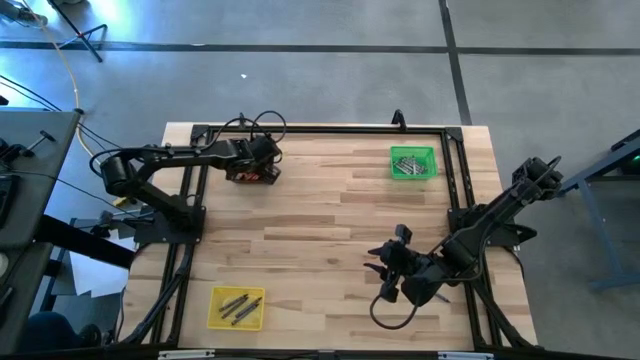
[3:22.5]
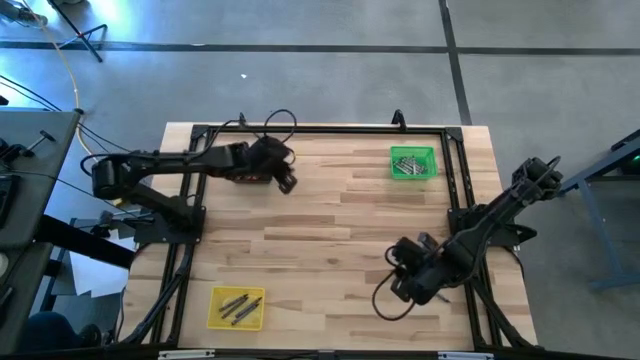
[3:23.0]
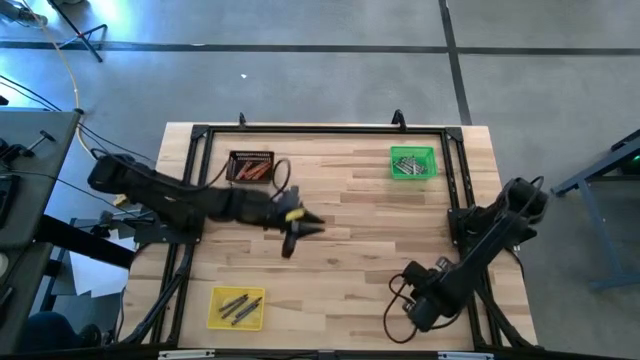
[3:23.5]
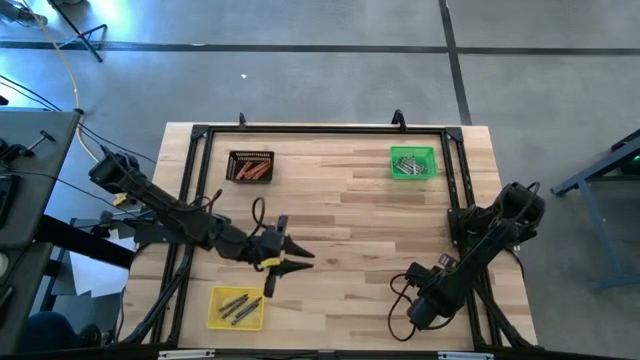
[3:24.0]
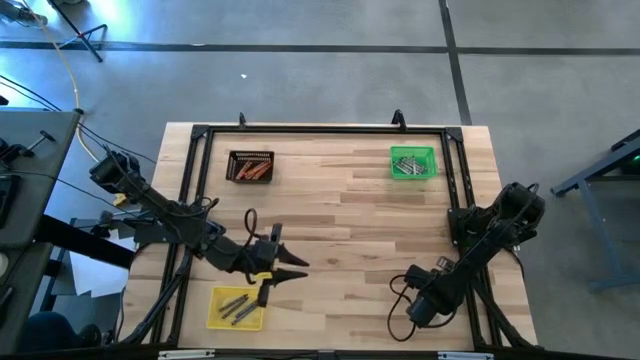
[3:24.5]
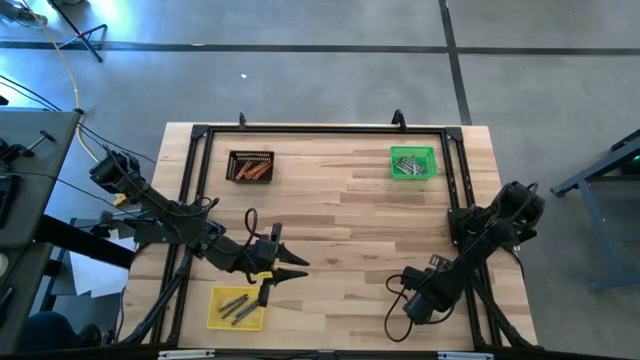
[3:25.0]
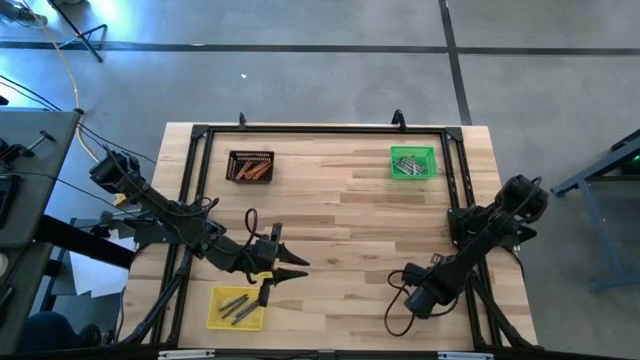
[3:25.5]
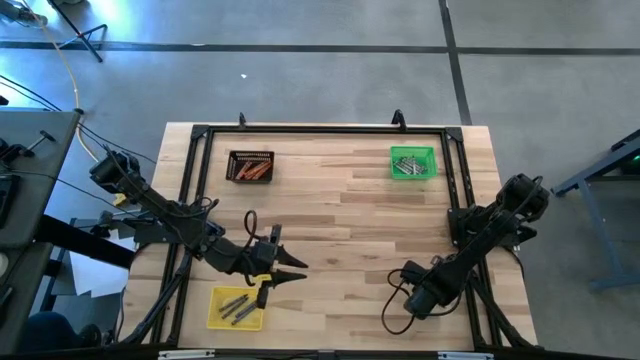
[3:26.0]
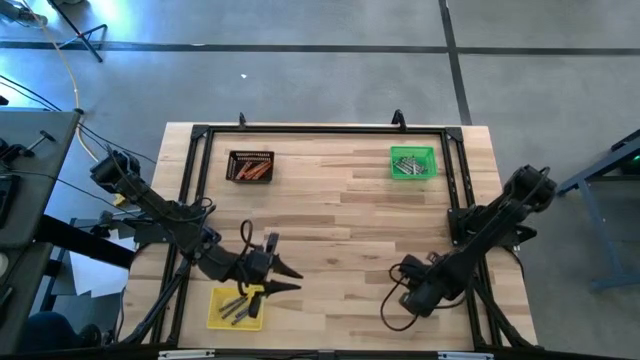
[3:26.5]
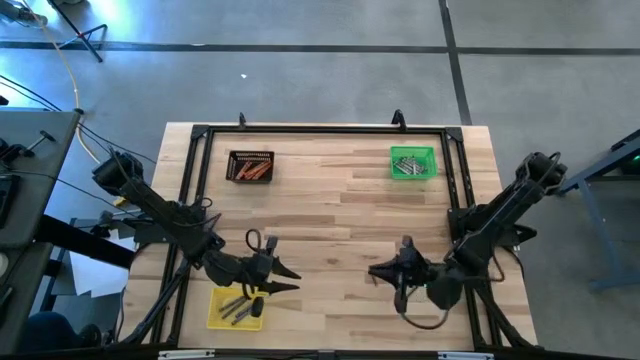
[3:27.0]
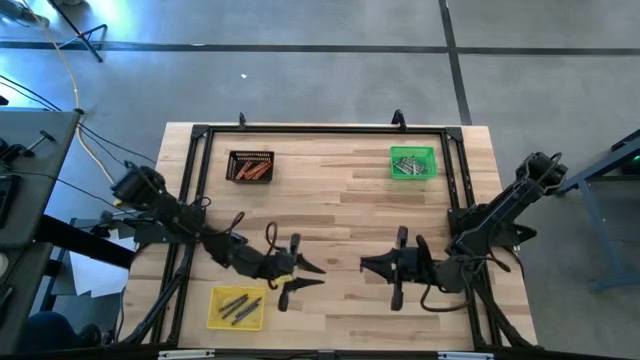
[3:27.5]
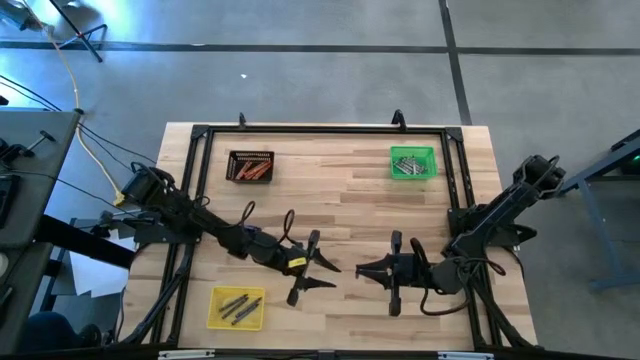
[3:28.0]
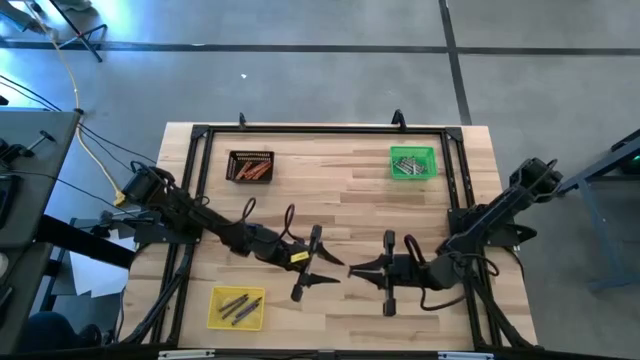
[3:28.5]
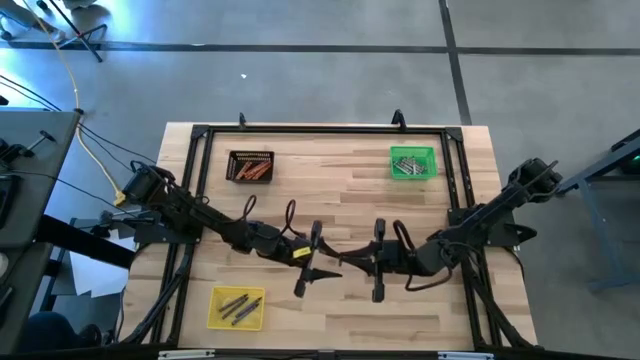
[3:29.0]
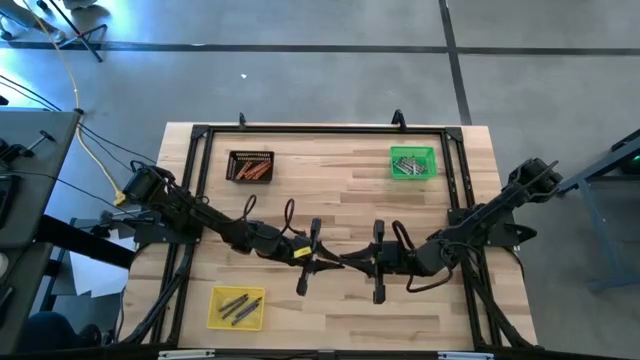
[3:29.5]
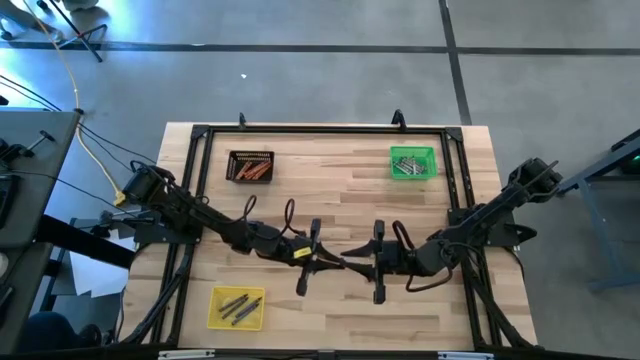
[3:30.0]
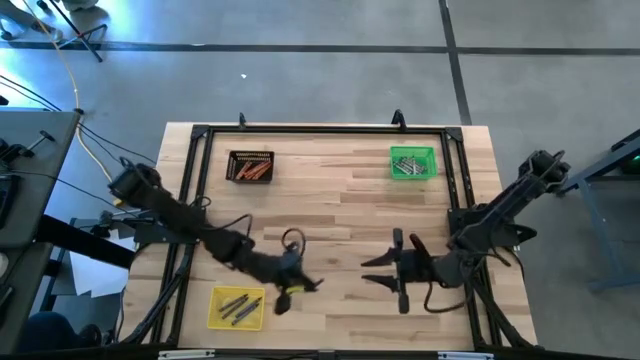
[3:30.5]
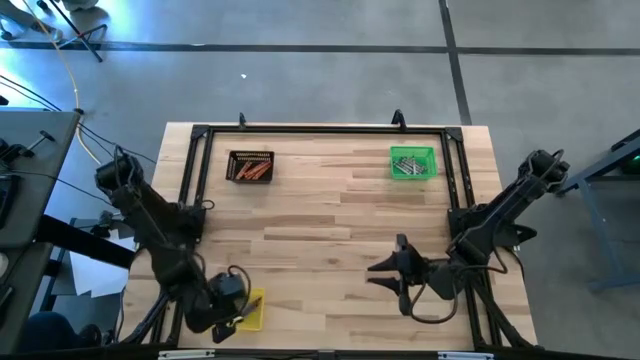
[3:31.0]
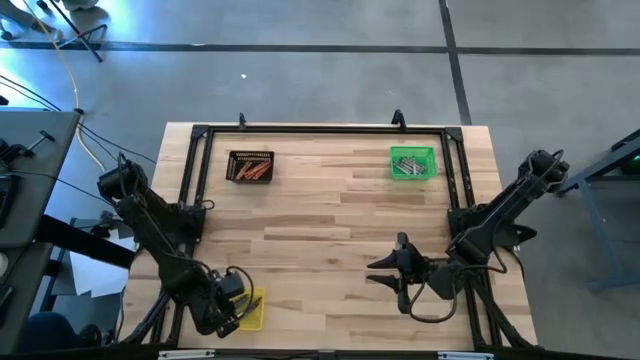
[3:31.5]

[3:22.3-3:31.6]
Task: Sort crayons
Put the blue crayon into the yellow bin

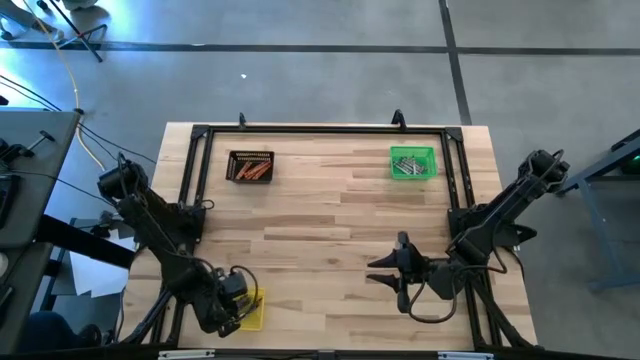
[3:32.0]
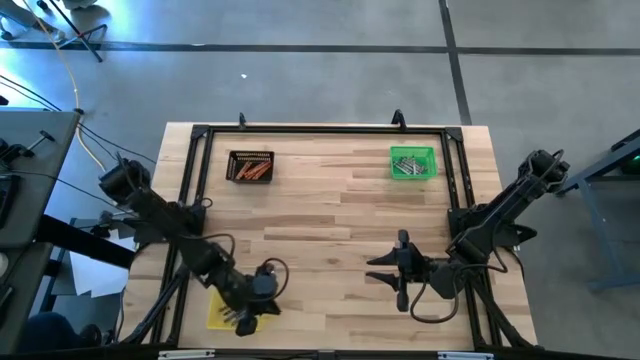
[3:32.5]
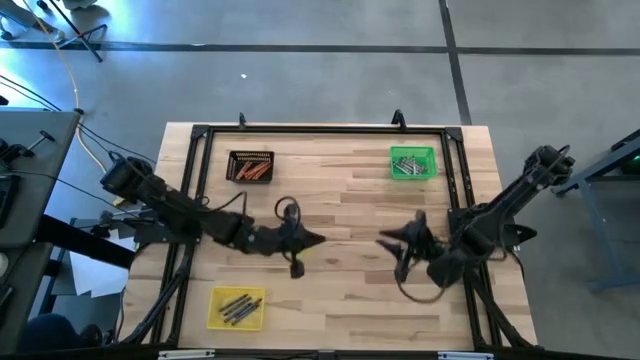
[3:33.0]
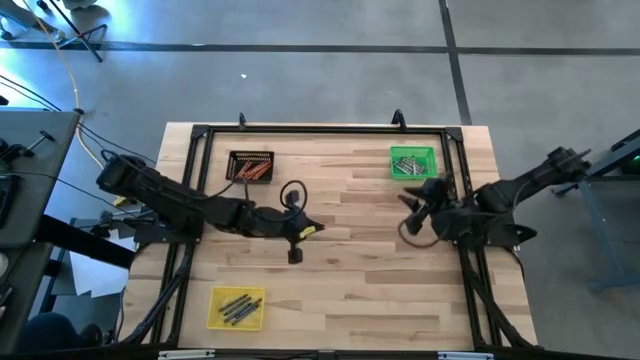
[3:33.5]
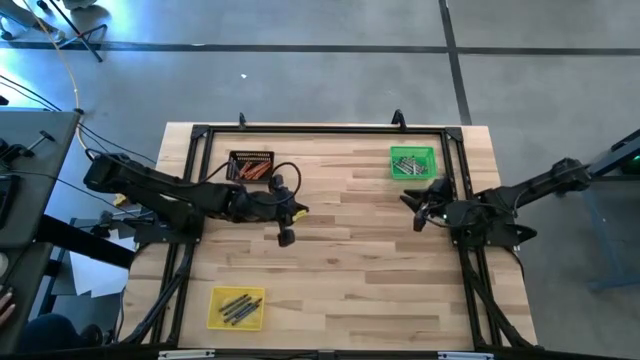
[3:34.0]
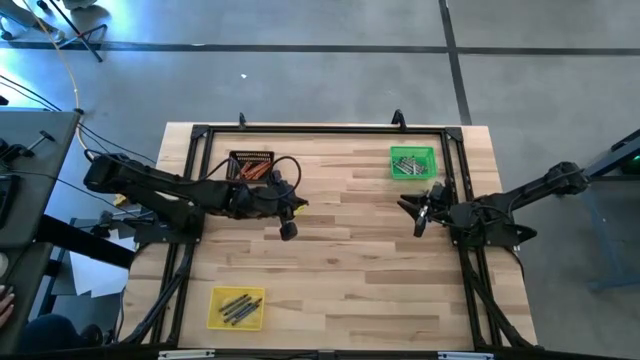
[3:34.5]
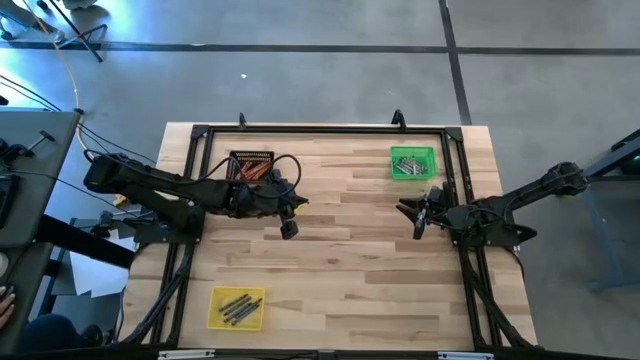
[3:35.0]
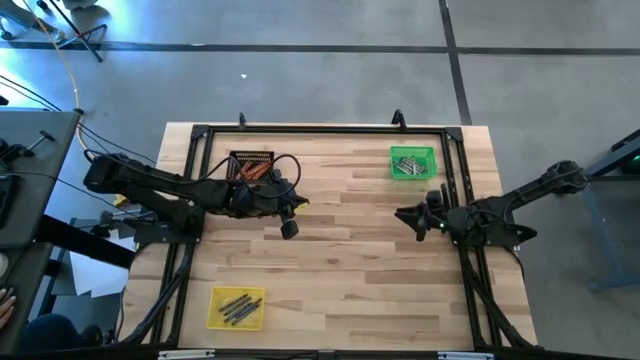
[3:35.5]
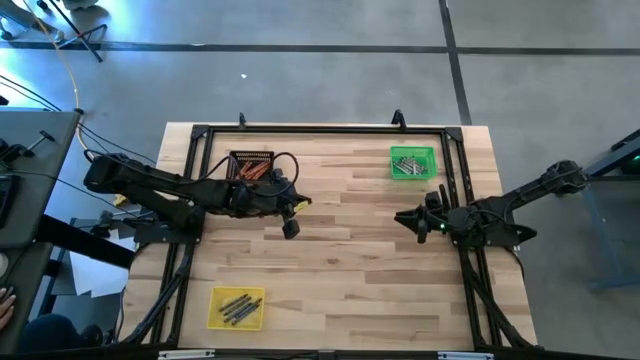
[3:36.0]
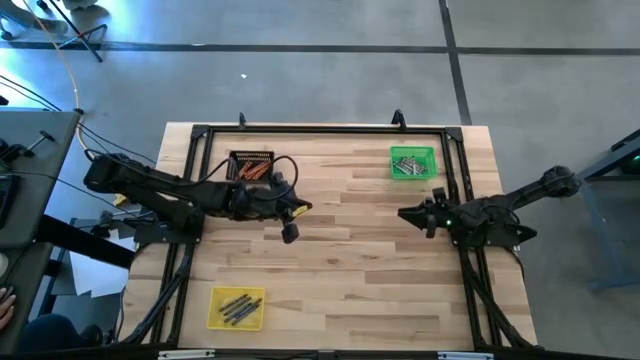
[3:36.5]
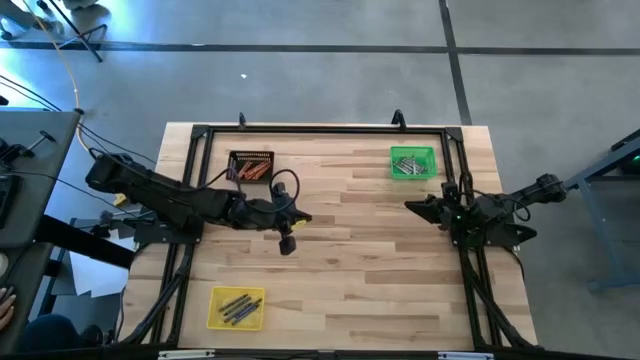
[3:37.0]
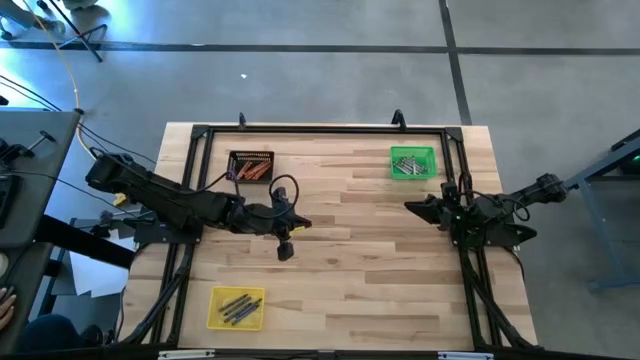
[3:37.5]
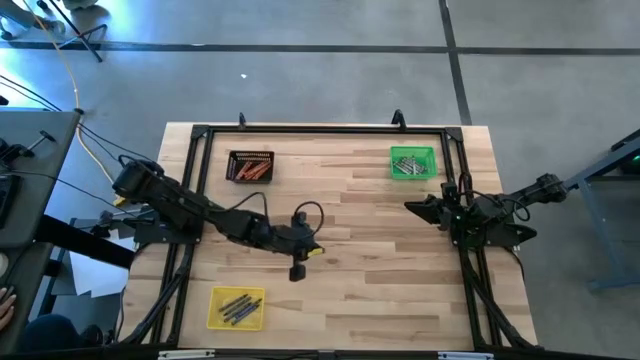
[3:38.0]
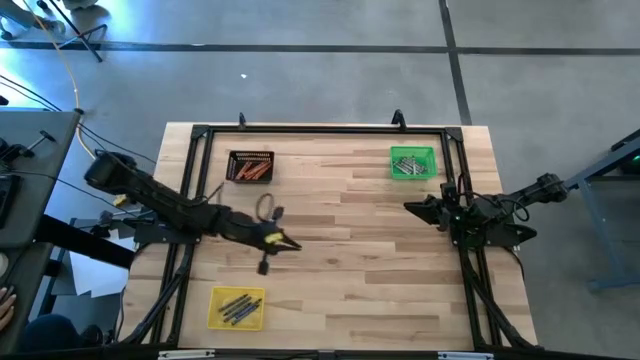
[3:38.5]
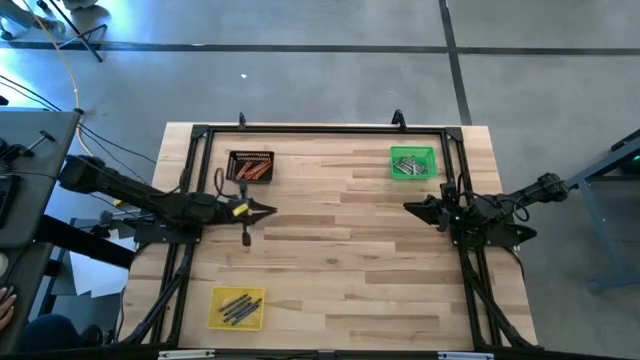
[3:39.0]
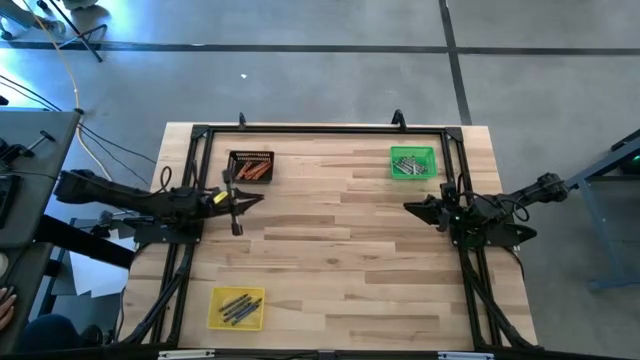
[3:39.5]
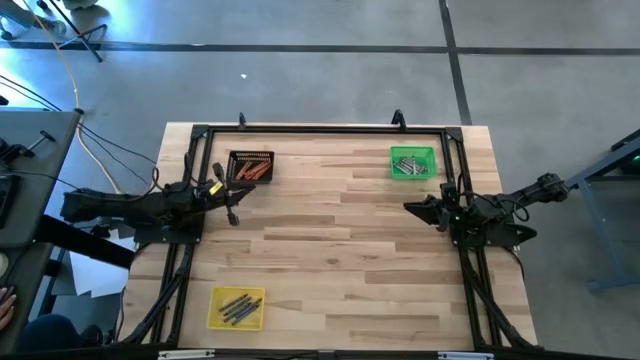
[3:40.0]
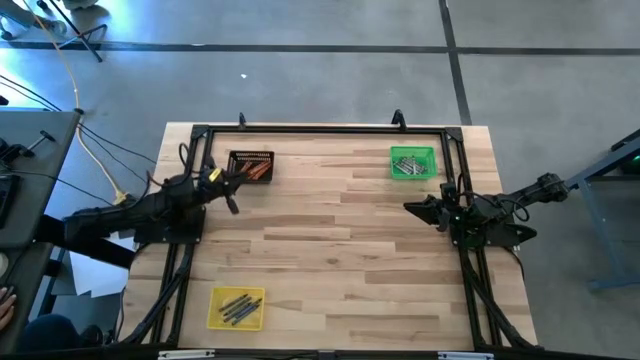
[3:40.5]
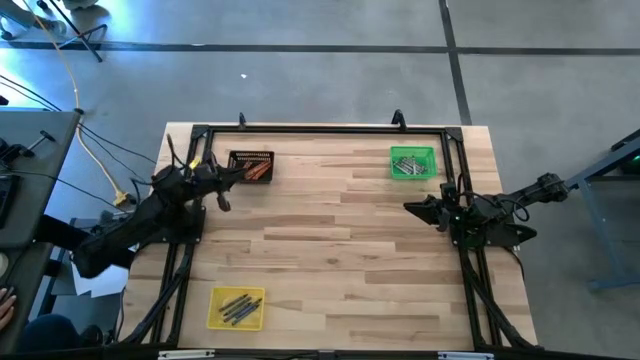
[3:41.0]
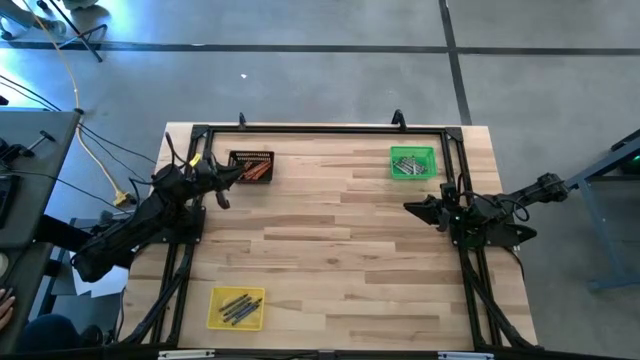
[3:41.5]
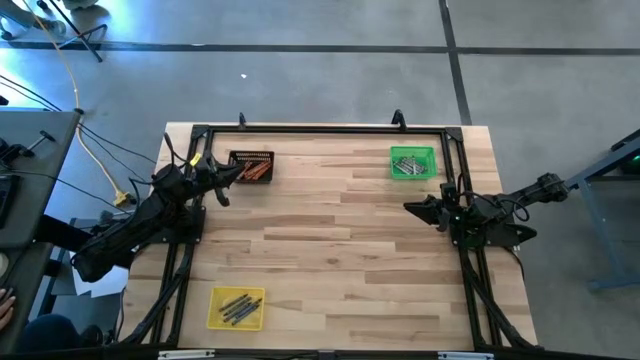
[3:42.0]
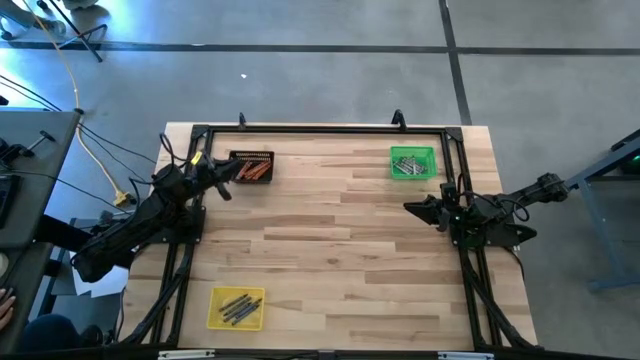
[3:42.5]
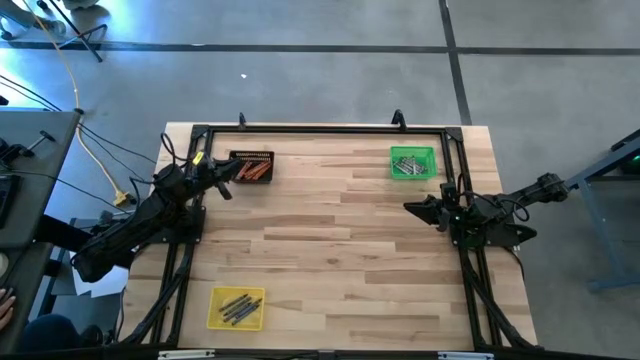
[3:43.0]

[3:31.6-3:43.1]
Return to Home Position
